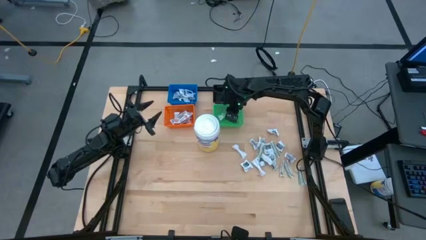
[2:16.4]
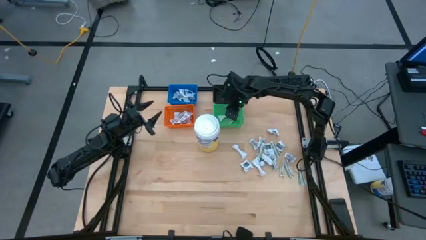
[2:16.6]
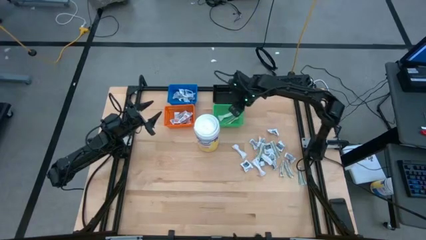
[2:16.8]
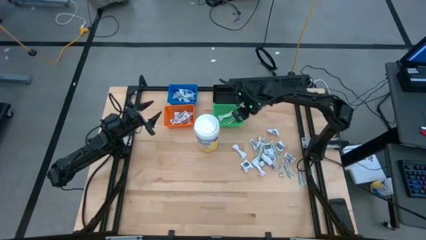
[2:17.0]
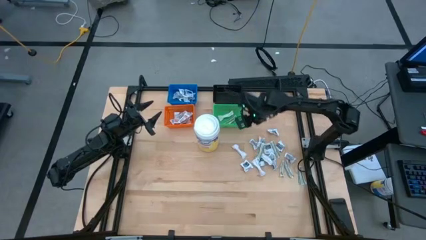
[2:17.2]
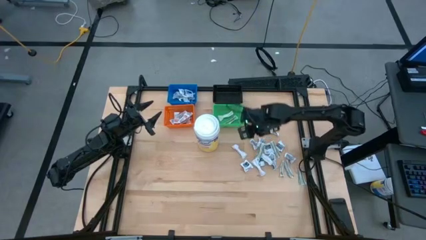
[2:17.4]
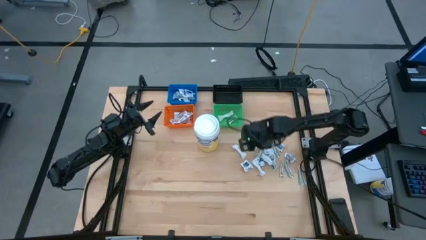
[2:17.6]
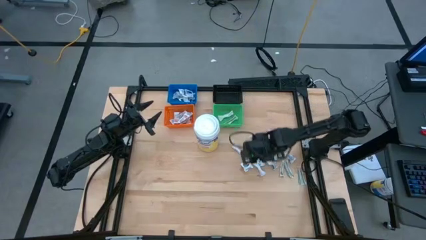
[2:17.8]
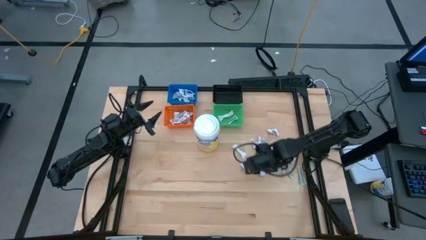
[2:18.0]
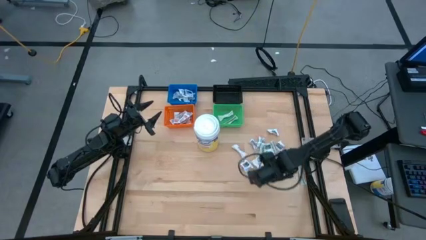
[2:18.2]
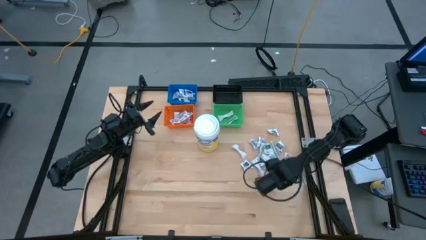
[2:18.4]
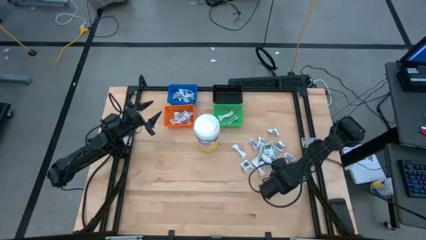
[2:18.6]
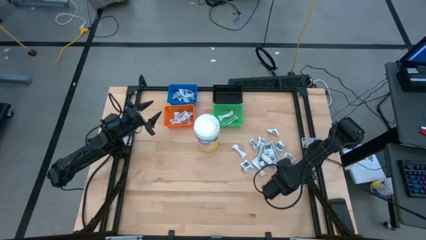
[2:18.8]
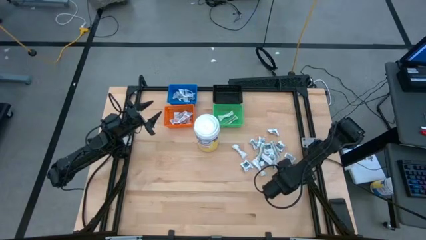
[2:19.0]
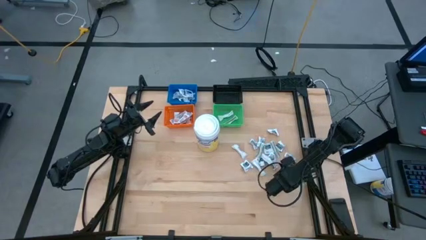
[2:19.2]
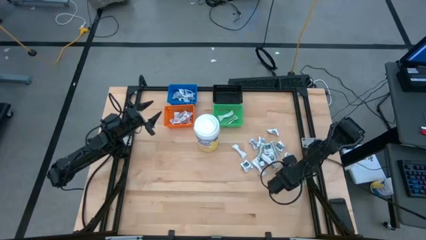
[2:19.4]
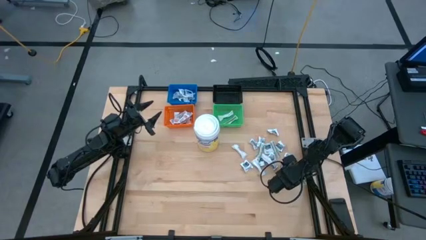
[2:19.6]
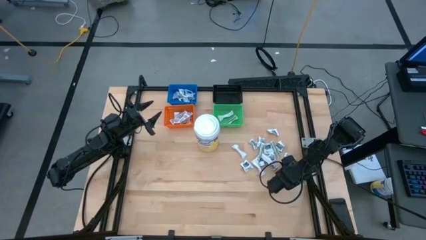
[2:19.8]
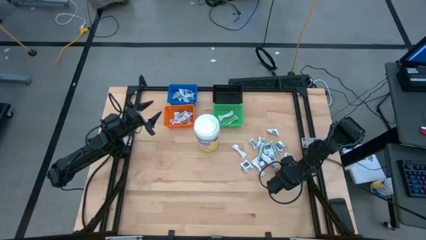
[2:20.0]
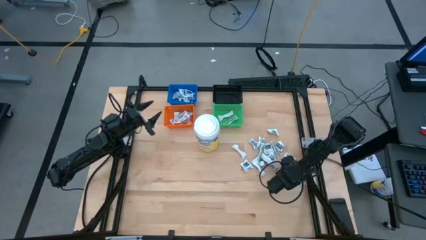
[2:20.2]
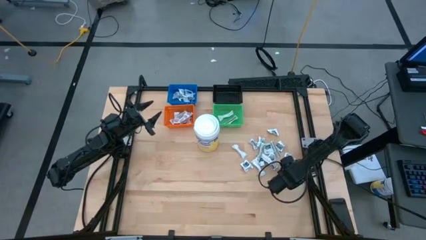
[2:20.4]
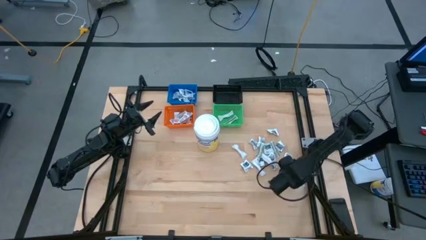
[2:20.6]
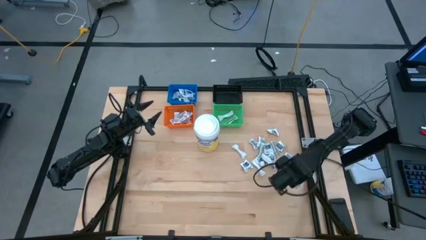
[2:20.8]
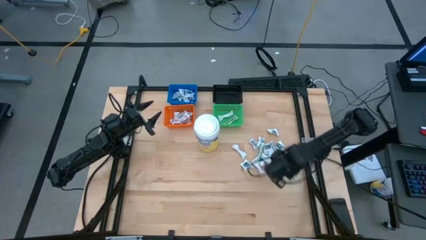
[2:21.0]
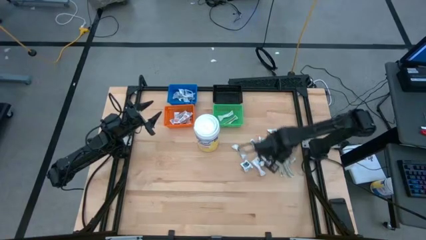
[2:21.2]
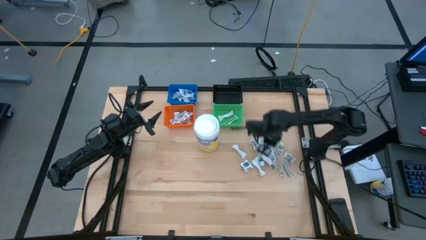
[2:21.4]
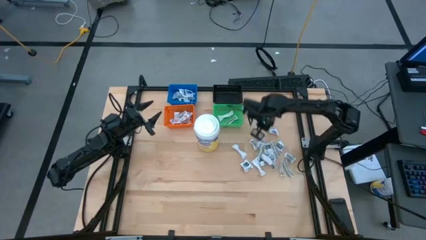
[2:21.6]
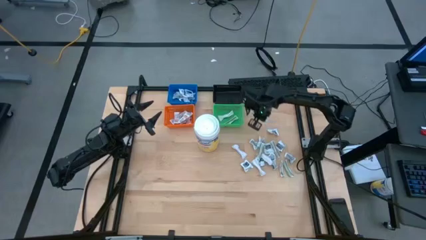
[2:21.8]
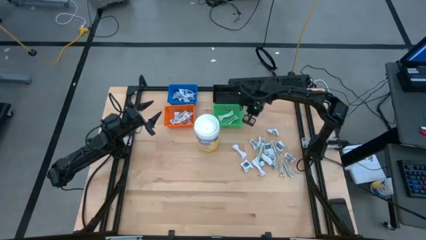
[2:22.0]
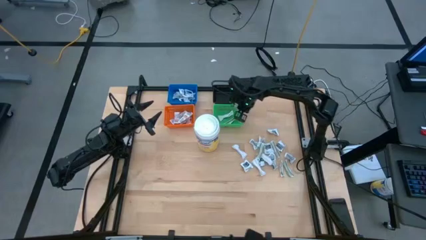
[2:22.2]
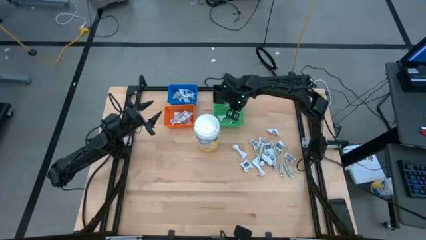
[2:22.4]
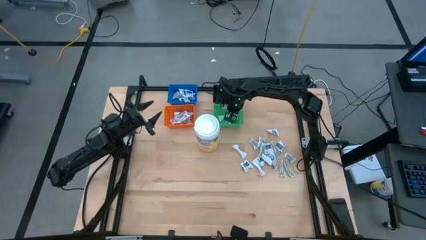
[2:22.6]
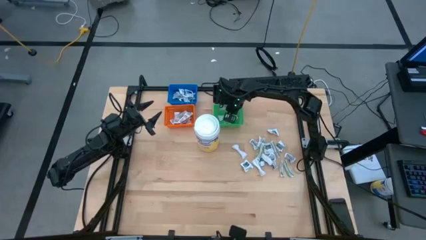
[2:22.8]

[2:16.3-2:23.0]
Task: Pick & Place First Aid Supplies
Put the green bandage into the green bin

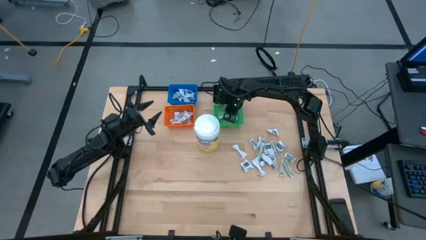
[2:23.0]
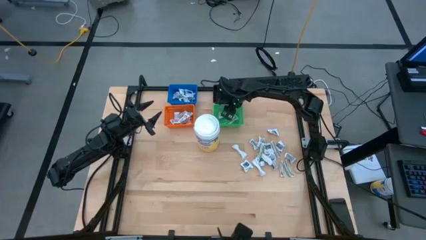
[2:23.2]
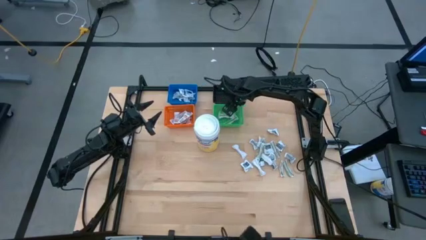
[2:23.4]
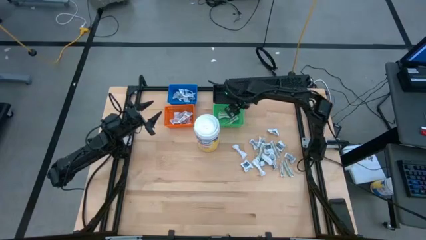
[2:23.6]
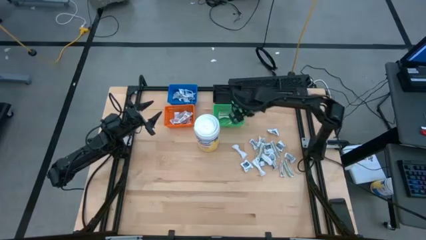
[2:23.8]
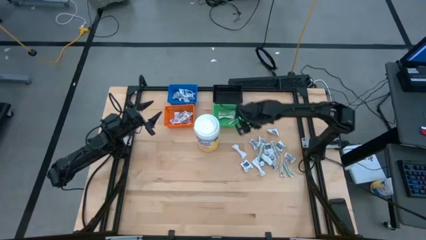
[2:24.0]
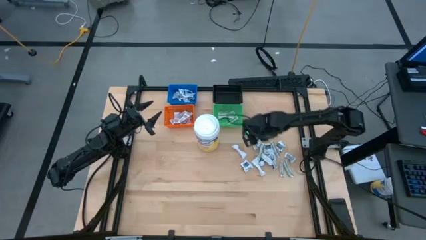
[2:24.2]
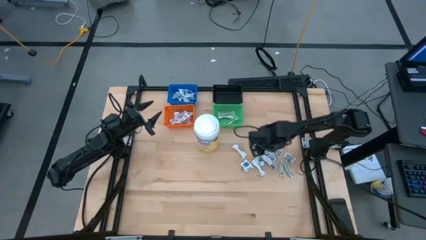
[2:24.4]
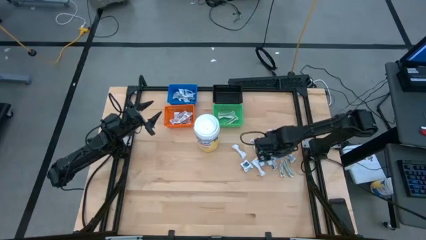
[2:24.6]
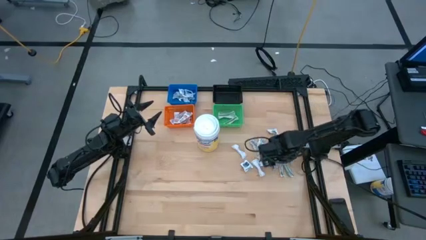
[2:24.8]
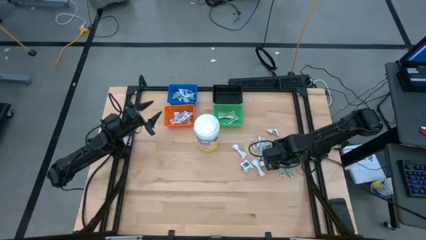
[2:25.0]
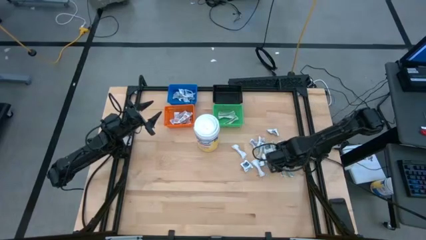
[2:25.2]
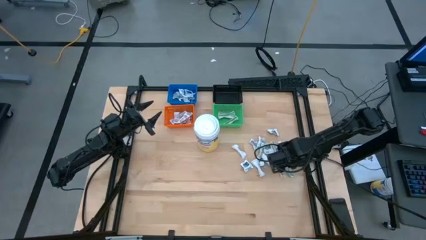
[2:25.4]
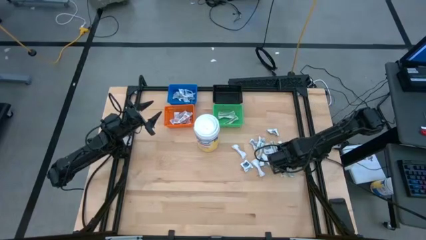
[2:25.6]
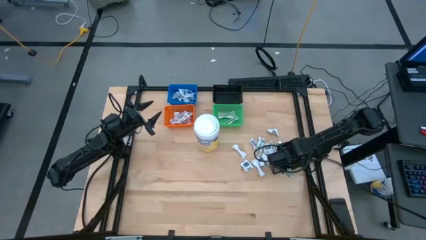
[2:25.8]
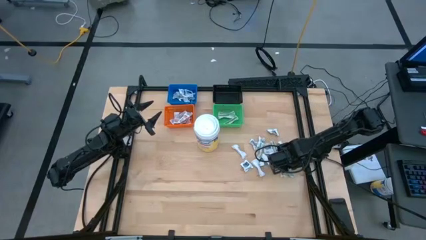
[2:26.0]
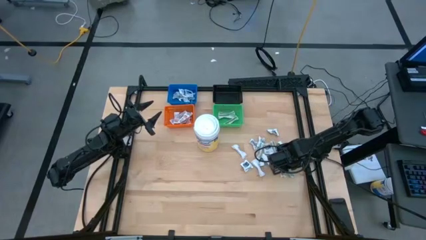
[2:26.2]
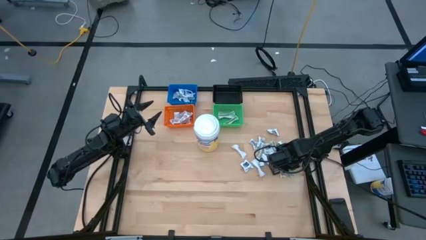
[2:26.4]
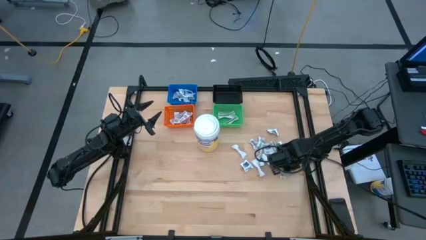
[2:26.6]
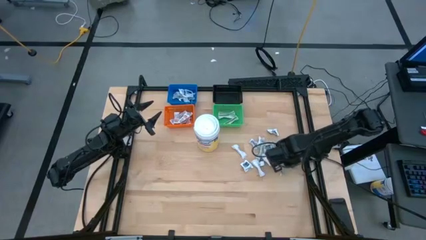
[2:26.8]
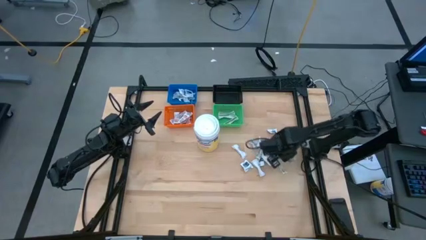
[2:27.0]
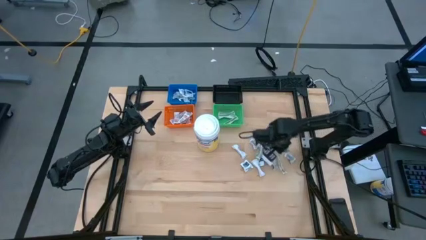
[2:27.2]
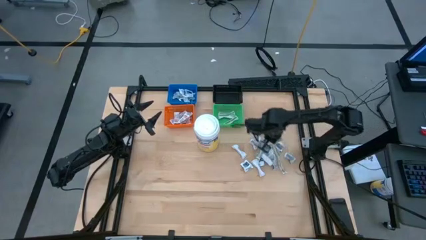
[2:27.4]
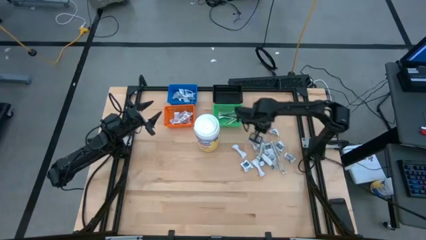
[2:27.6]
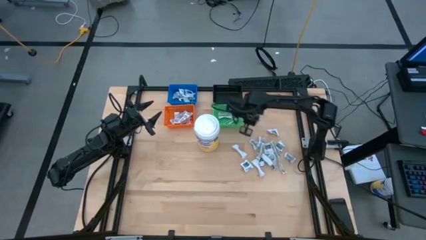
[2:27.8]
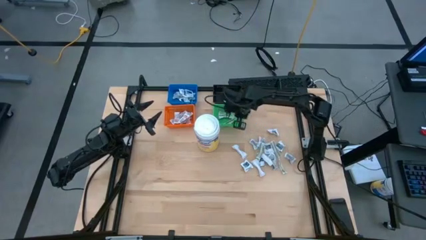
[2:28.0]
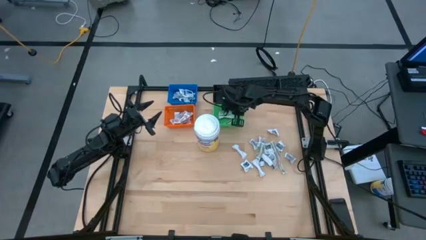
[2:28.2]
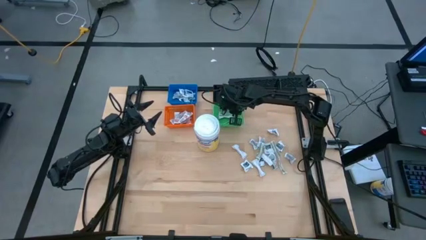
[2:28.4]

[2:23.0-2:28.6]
Put the green bandage into the green bin

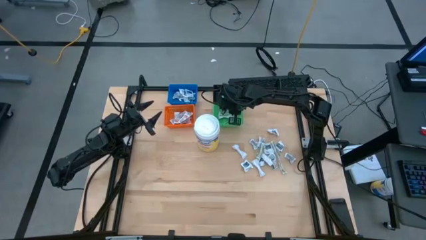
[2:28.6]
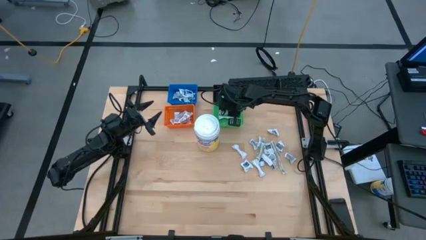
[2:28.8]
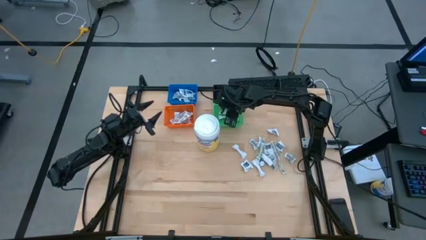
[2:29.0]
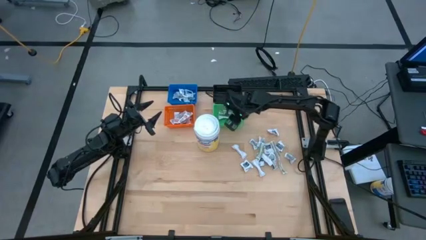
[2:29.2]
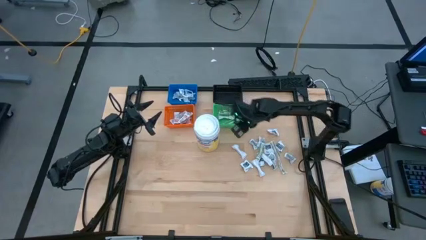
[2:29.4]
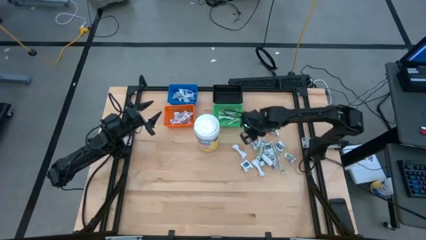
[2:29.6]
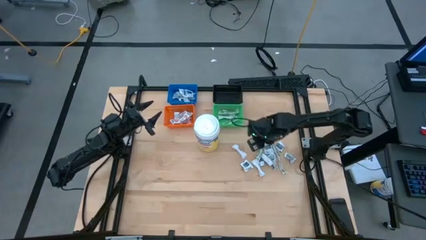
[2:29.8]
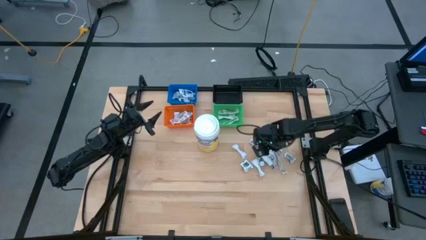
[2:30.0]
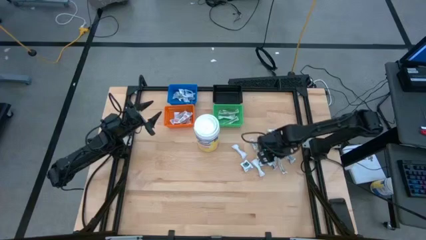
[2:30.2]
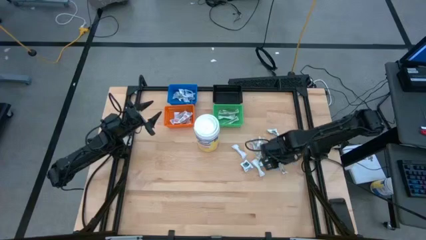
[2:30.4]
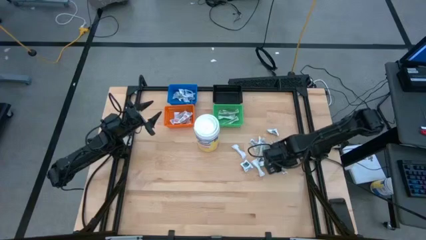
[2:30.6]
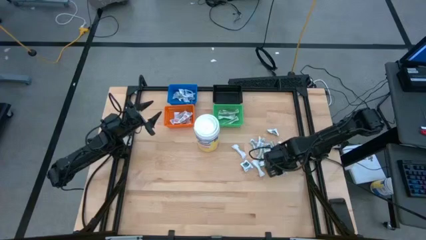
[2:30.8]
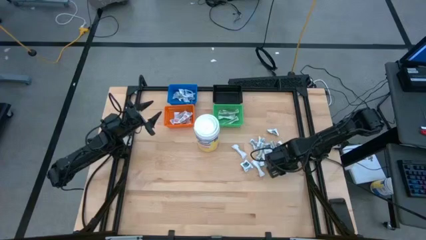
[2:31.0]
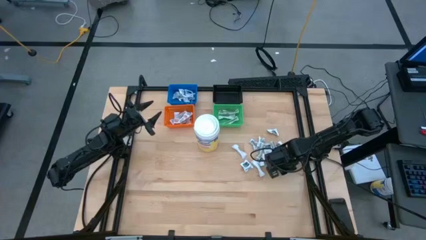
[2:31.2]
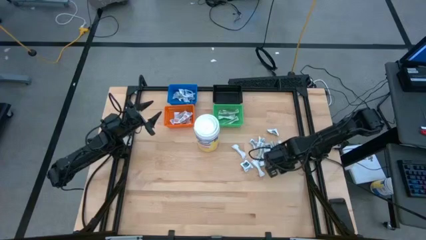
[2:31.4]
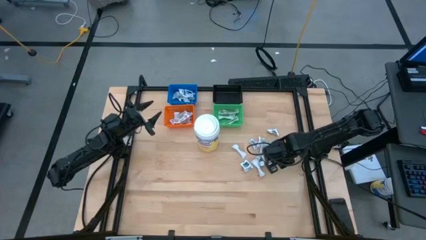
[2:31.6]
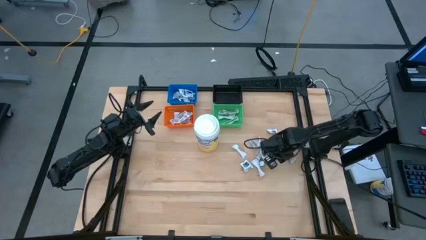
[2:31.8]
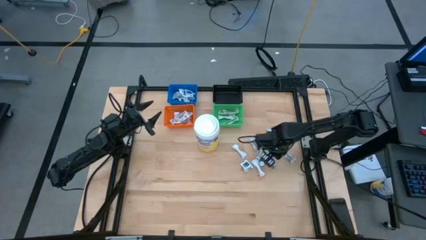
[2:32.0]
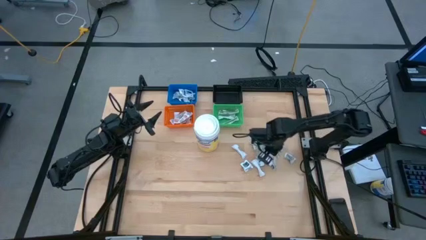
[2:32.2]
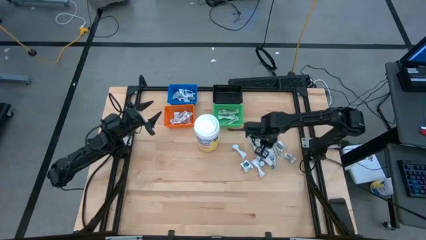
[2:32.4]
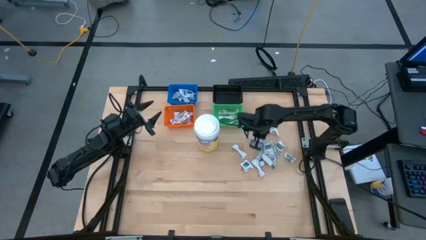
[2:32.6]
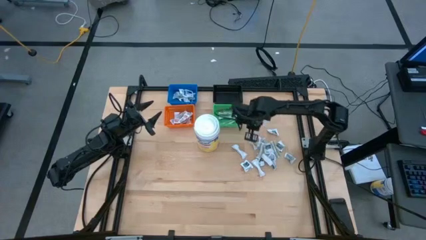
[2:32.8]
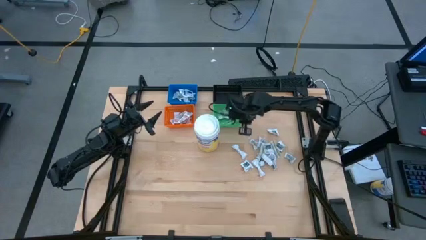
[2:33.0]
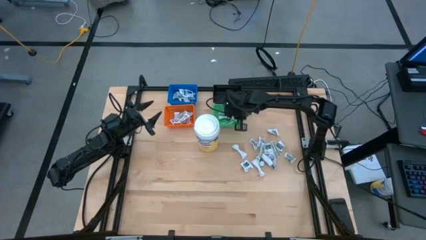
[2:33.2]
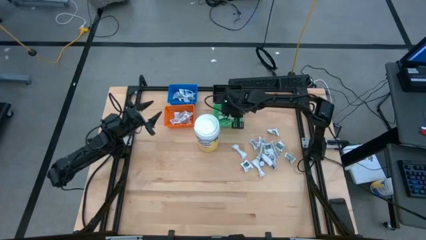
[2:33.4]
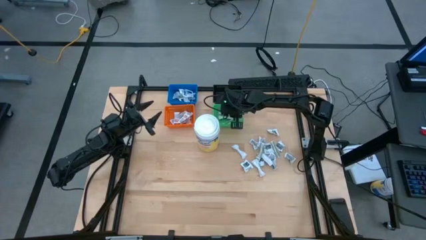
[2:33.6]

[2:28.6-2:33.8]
Put the green bandage into the green bin
